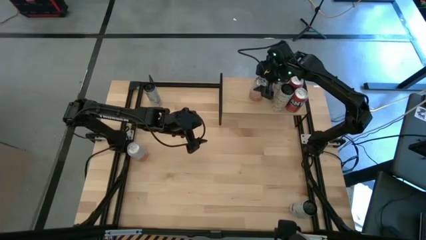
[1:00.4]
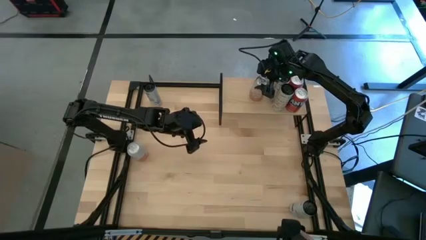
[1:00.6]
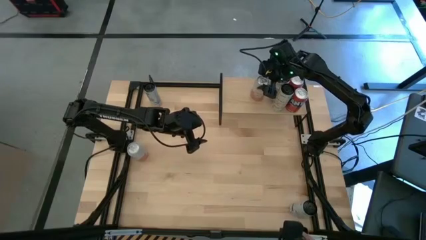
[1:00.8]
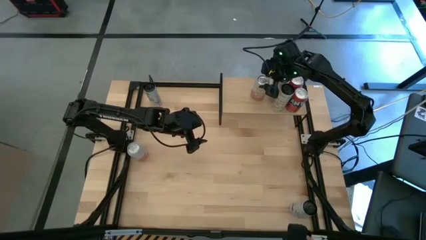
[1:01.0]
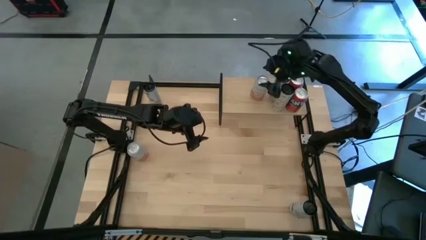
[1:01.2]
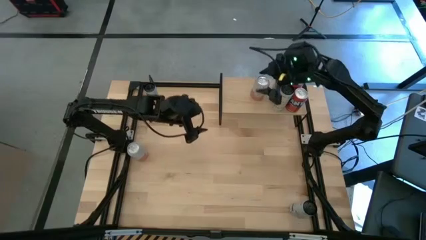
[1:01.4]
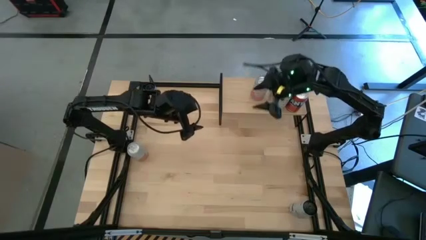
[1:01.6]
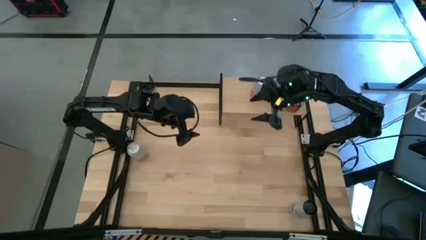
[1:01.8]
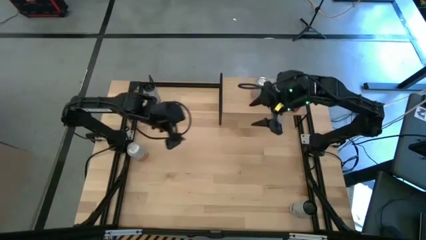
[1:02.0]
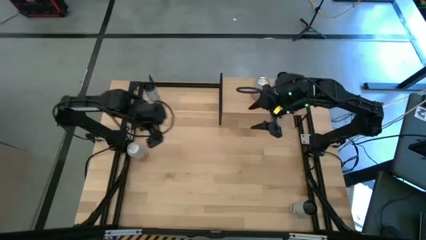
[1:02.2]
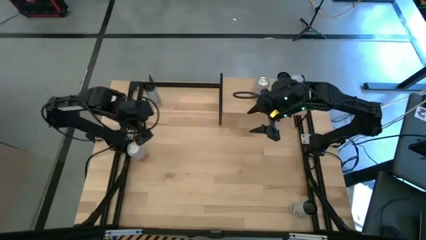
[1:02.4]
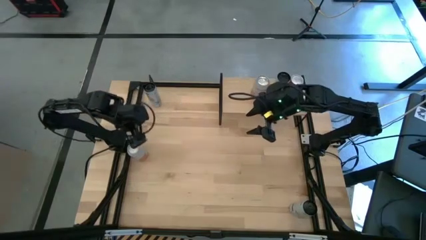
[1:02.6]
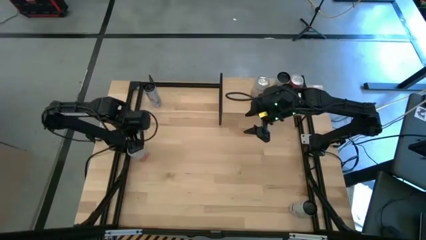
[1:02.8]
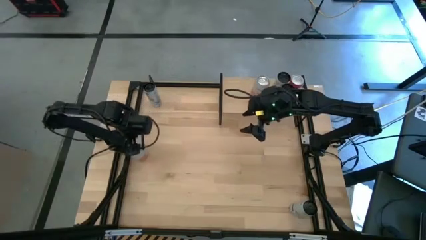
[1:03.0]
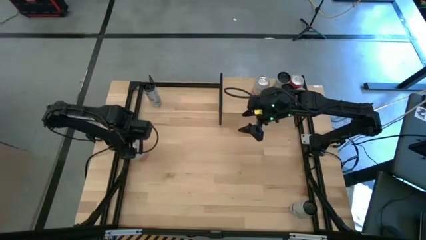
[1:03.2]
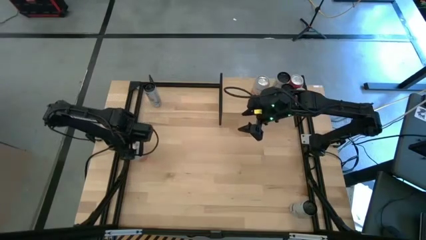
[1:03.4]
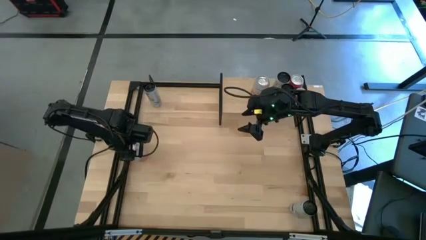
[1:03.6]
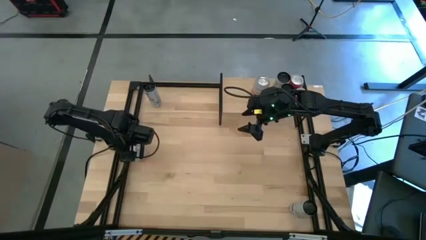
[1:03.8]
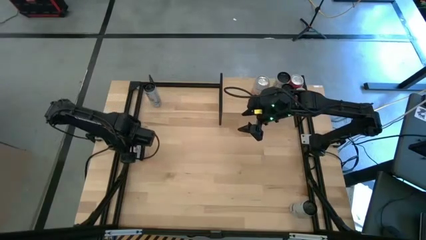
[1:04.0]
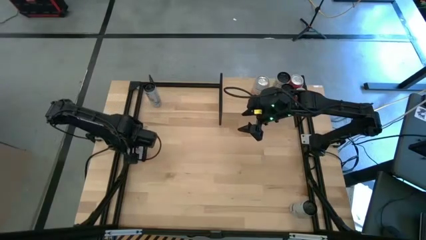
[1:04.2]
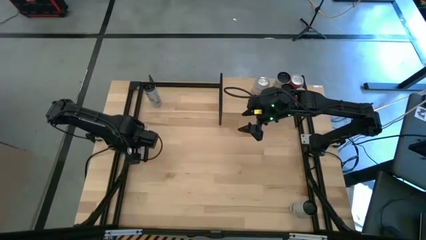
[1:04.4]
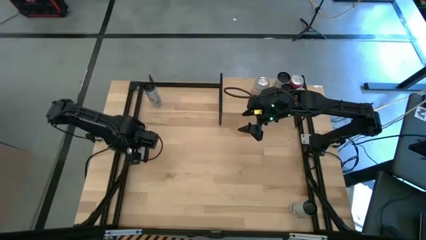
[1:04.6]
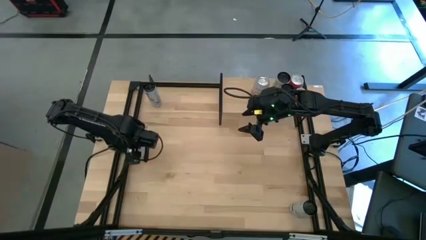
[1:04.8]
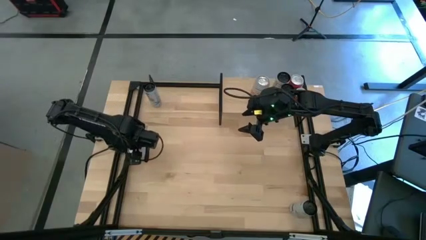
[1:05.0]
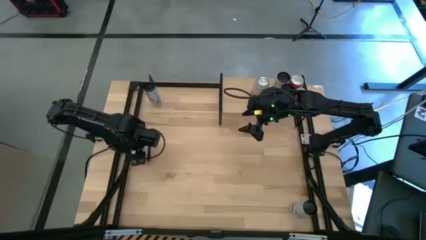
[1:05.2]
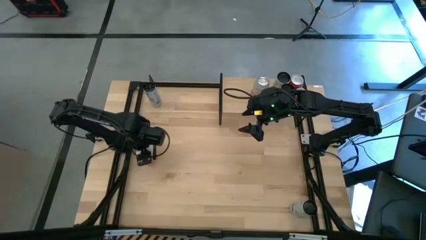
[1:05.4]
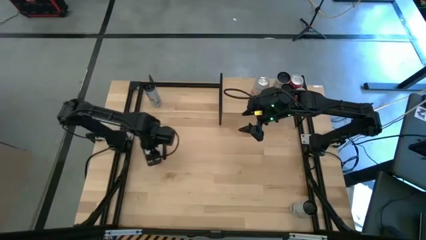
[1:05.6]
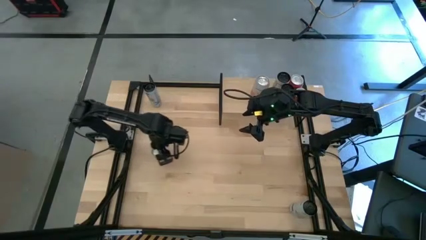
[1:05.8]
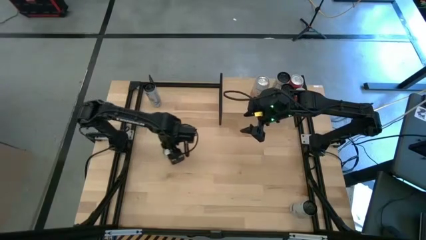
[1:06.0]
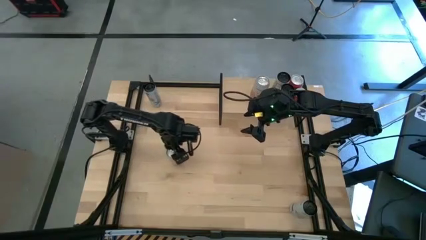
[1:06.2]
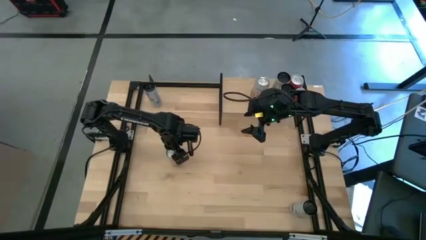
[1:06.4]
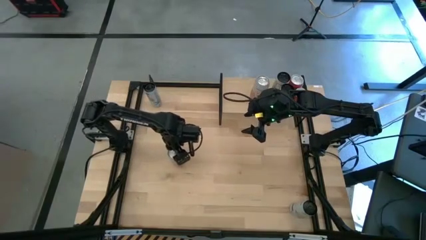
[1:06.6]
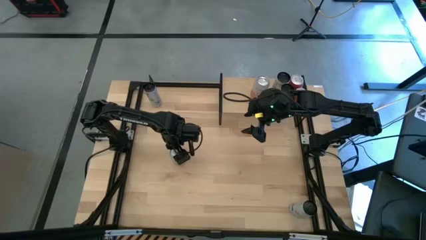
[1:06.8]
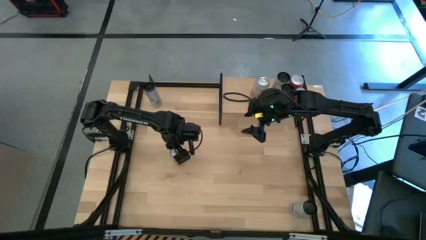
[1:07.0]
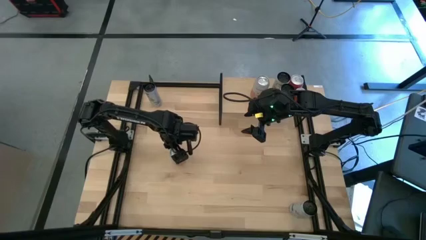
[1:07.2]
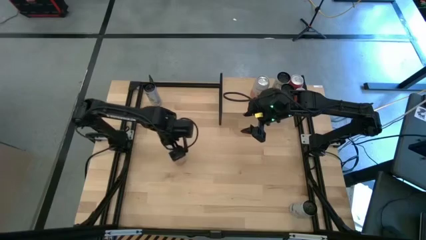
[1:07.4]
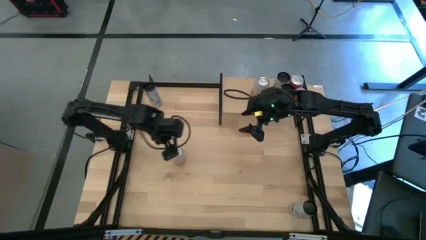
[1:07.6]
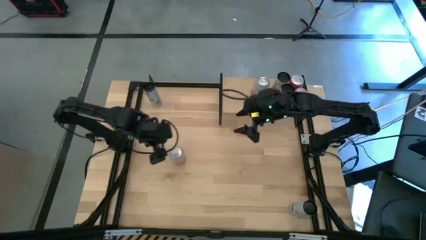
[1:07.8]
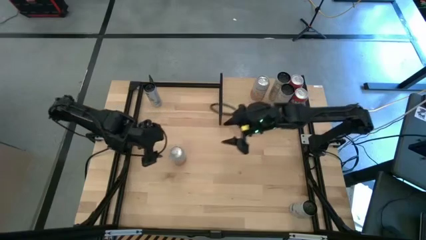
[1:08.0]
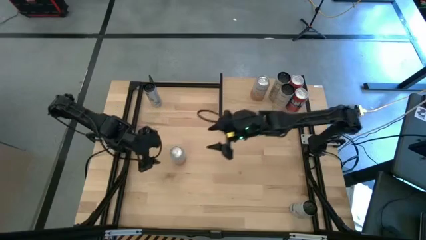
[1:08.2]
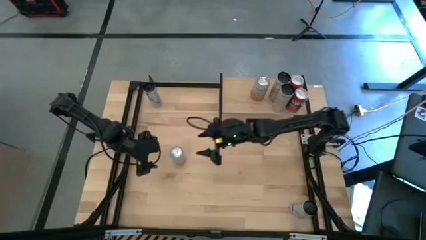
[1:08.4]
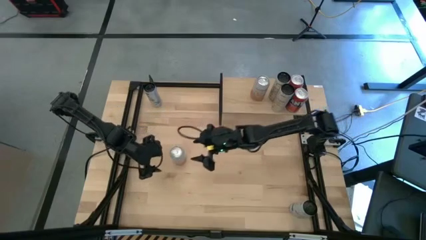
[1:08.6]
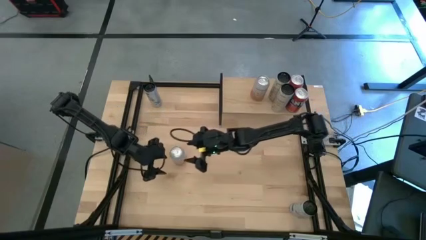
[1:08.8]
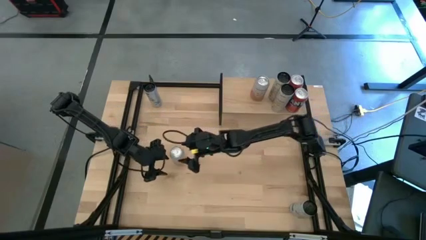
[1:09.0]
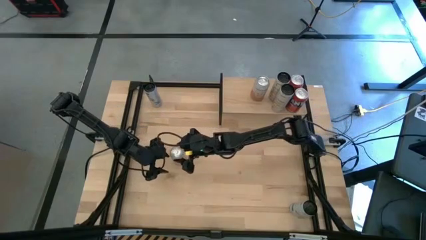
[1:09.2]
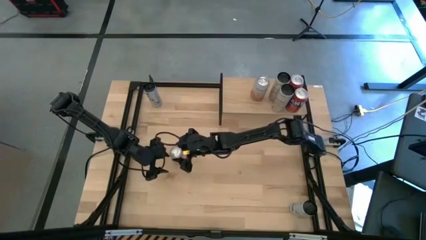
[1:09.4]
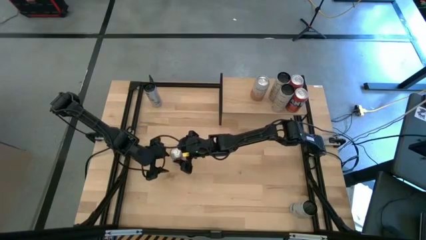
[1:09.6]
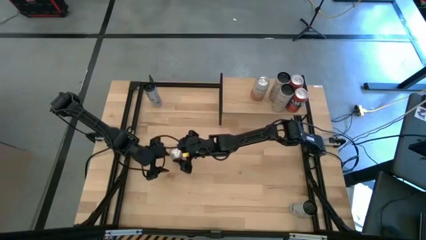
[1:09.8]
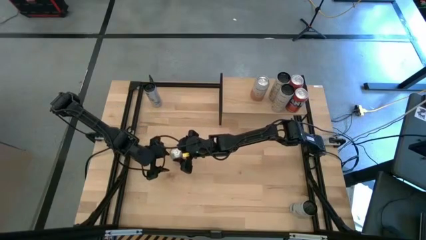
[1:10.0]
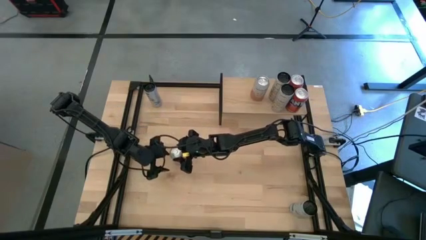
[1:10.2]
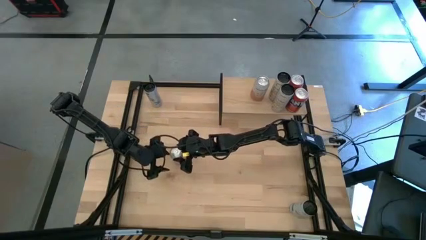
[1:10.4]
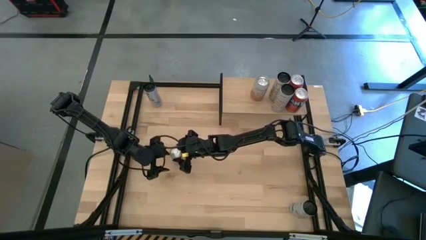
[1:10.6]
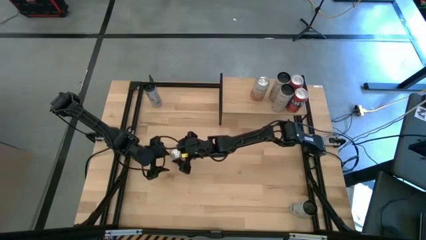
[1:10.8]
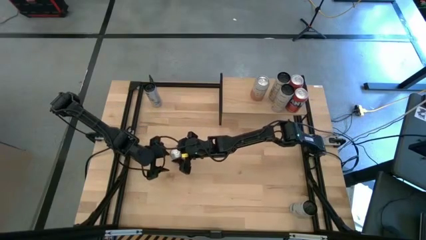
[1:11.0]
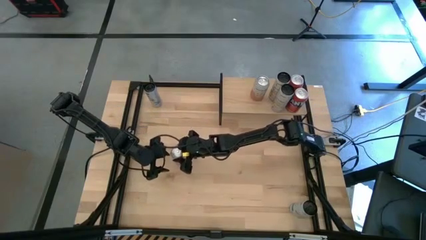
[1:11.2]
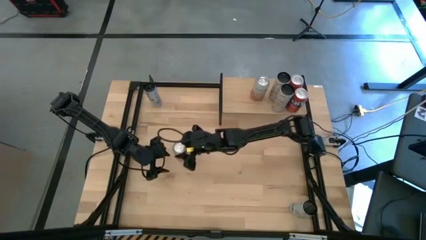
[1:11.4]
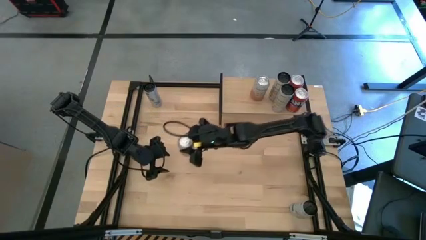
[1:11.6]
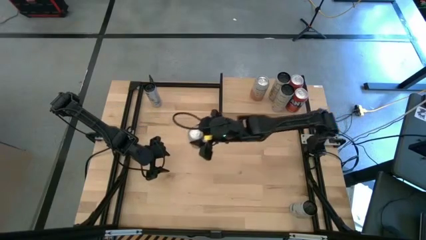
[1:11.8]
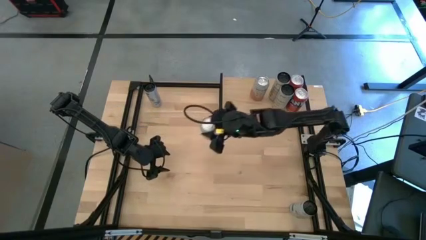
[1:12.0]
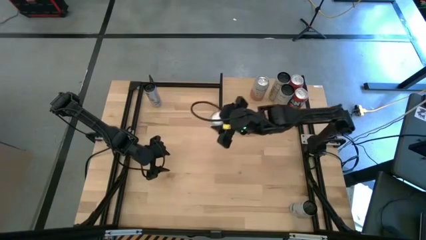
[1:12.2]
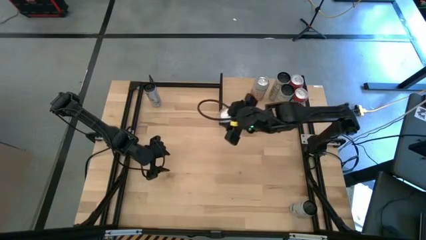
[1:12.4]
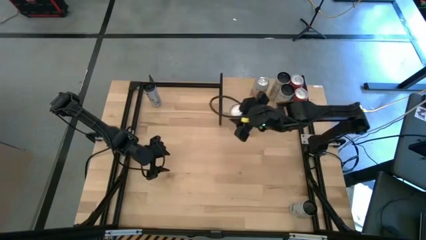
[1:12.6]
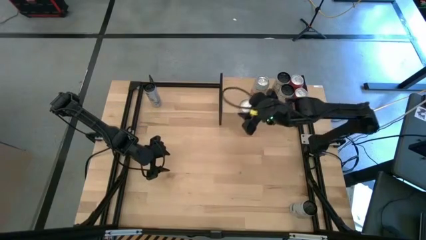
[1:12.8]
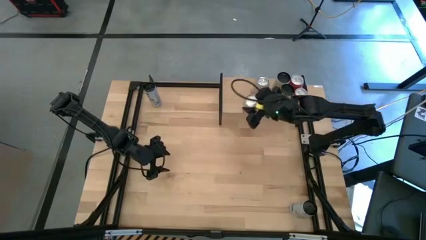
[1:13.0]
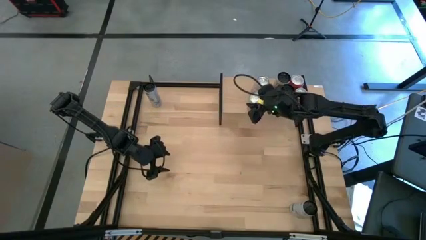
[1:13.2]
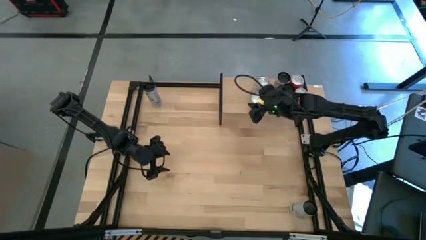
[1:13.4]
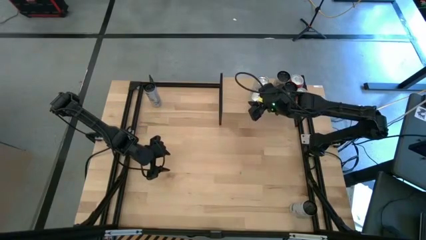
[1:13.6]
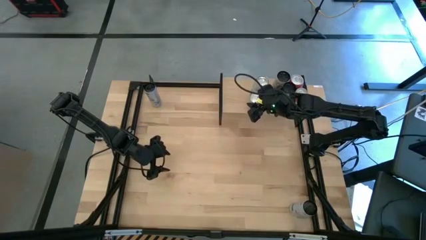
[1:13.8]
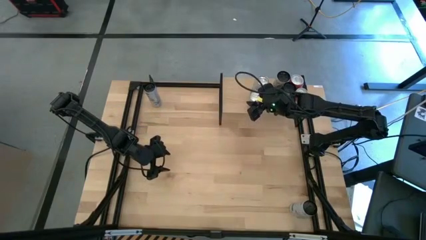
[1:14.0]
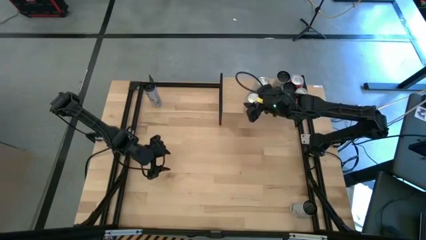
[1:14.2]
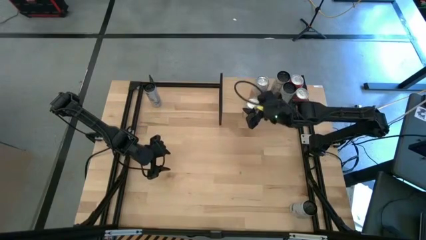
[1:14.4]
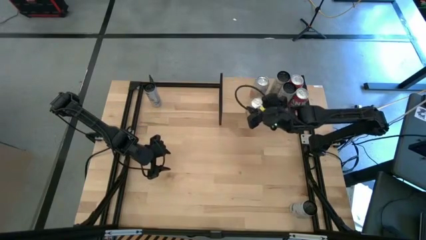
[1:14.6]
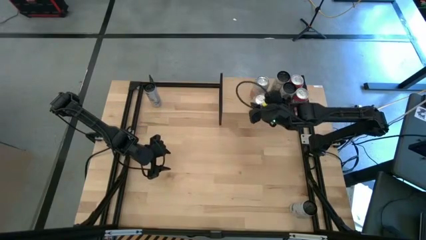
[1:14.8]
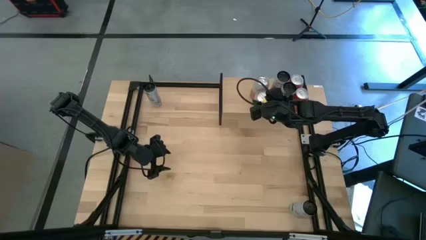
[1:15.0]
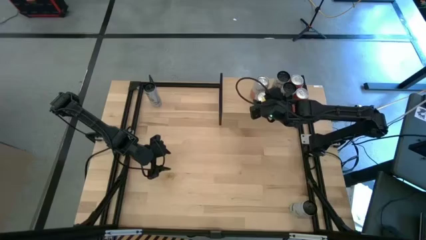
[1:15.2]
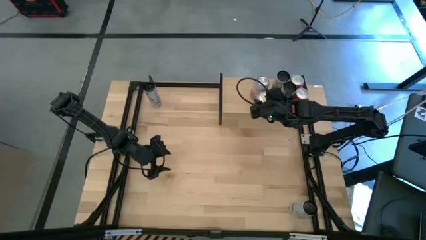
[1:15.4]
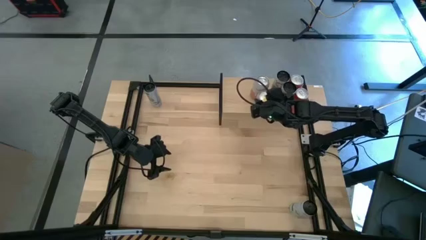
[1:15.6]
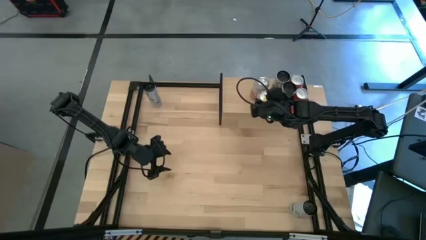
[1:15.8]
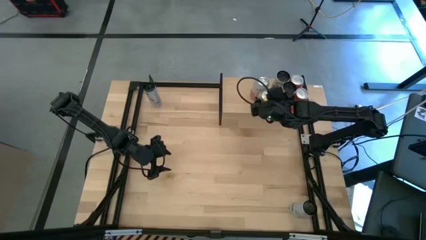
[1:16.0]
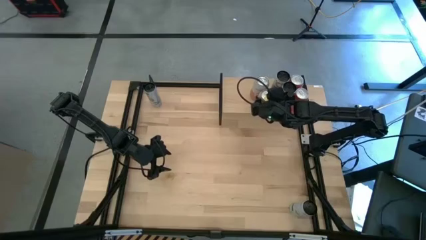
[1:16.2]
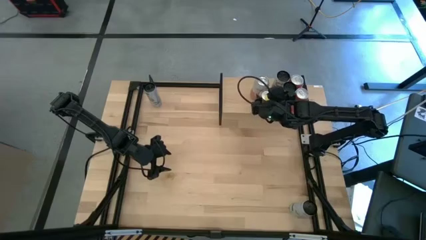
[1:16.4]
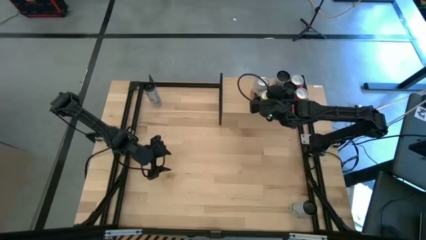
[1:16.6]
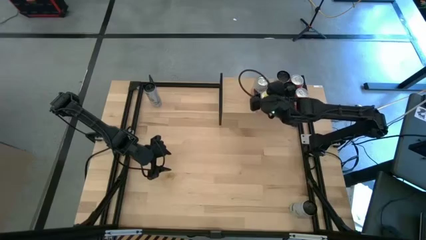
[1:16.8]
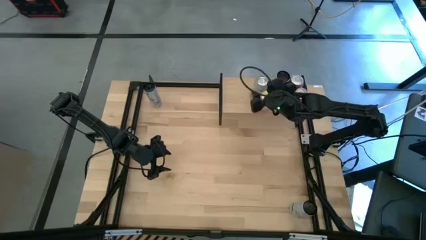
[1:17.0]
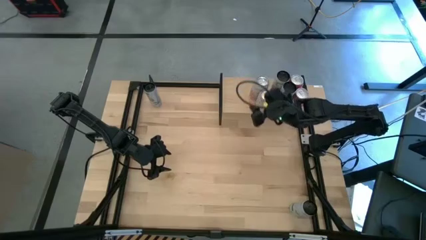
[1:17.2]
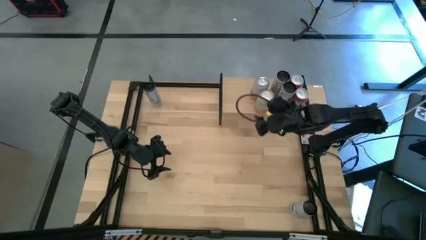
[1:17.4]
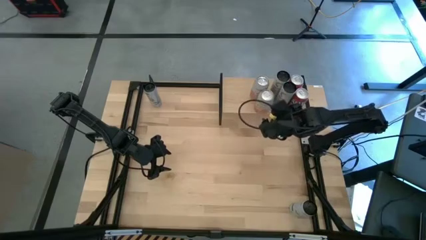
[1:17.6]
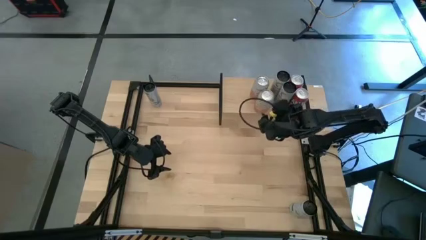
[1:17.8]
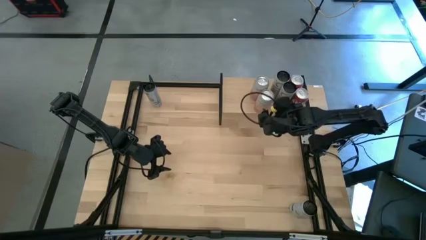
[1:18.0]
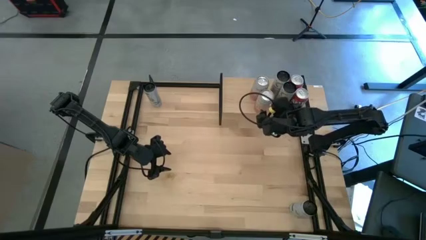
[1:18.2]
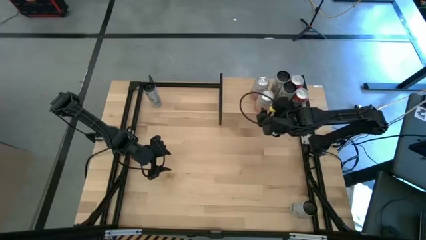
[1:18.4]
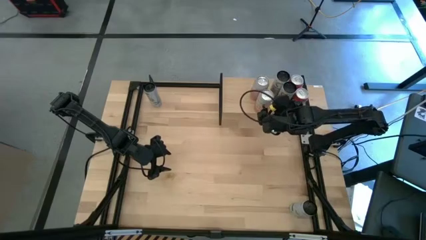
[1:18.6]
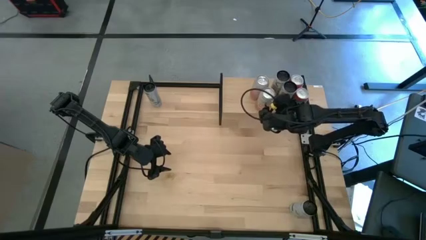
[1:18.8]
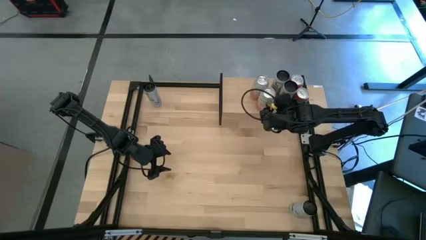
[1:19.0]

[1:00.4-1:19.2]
Task: Place canned beverage on shelf
Put the orange soda can on the shelf aligned with the other orange soda can
